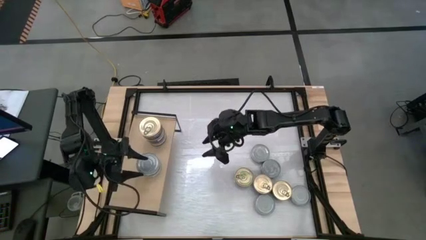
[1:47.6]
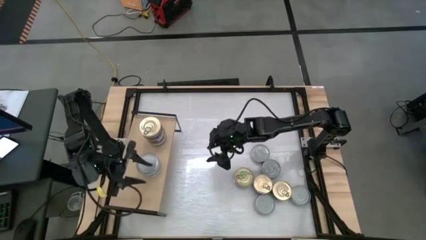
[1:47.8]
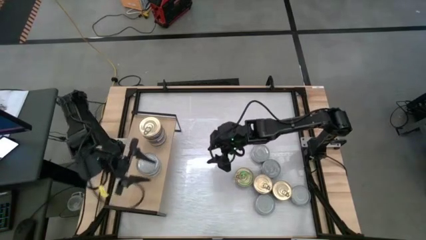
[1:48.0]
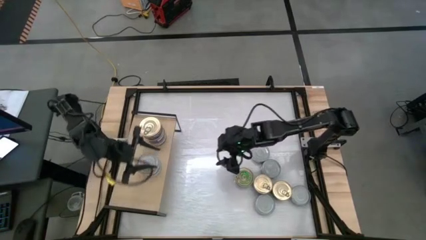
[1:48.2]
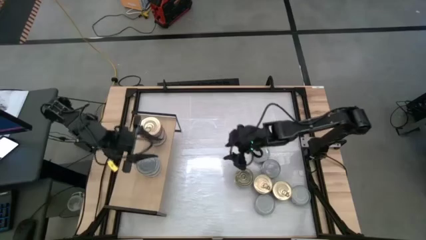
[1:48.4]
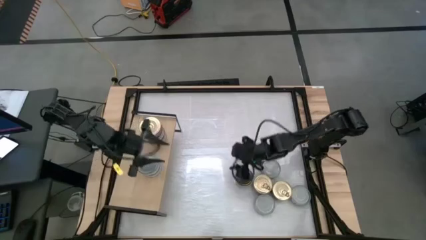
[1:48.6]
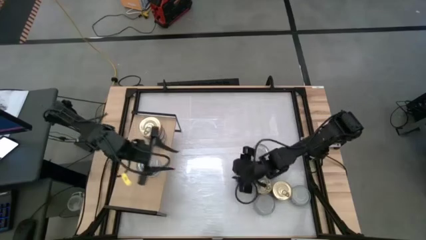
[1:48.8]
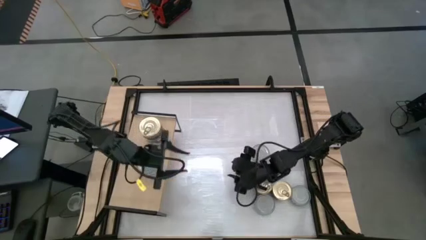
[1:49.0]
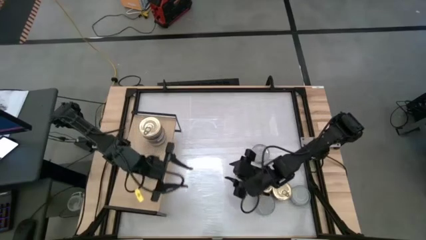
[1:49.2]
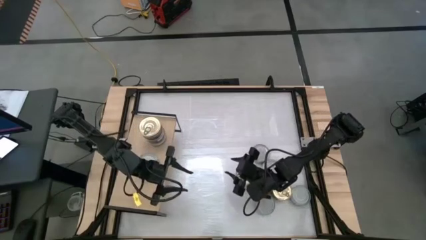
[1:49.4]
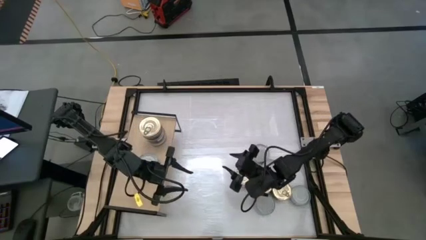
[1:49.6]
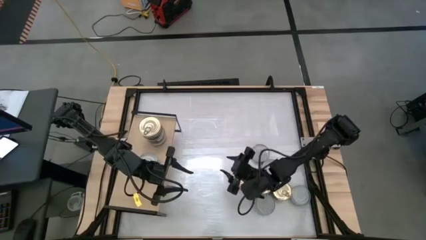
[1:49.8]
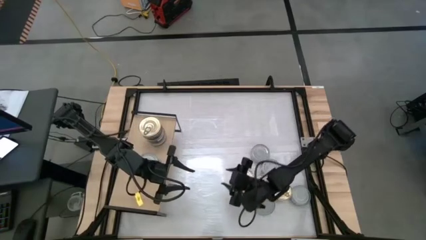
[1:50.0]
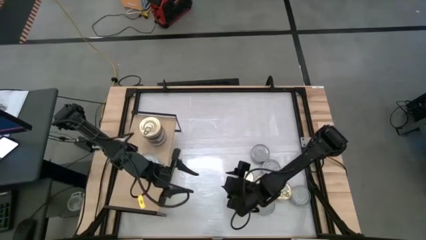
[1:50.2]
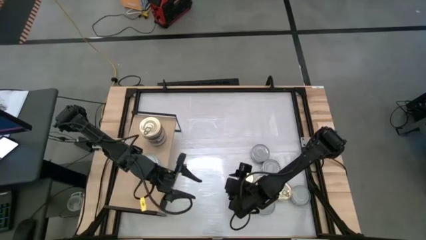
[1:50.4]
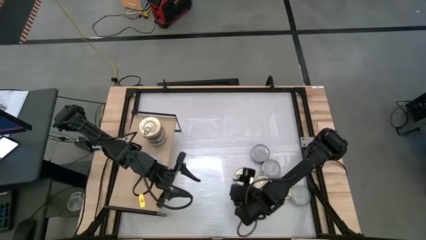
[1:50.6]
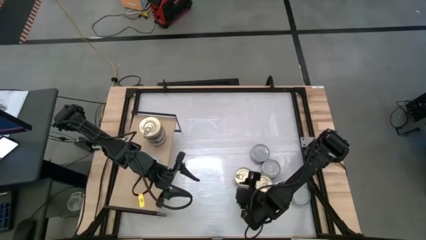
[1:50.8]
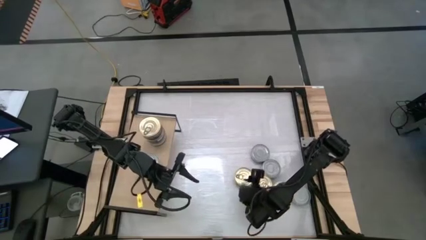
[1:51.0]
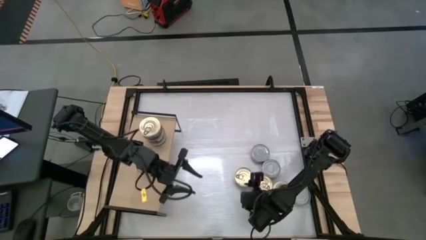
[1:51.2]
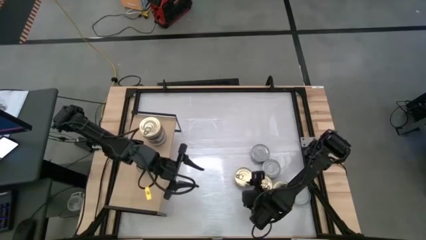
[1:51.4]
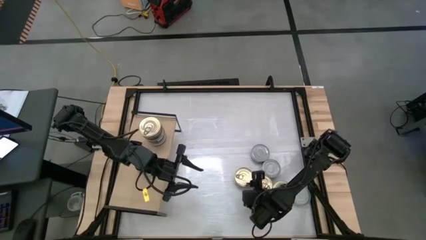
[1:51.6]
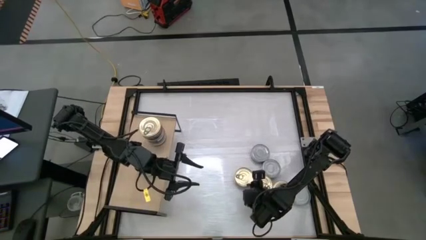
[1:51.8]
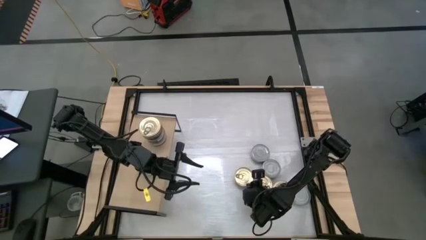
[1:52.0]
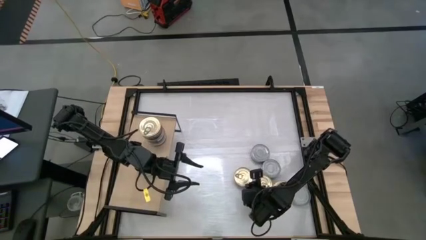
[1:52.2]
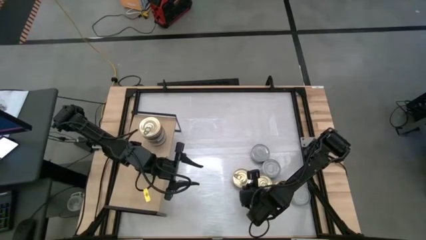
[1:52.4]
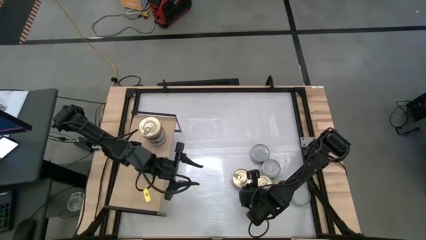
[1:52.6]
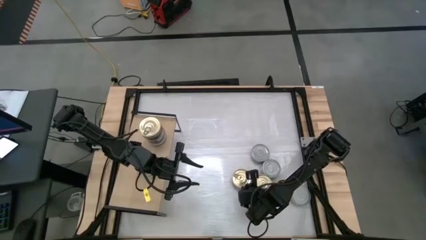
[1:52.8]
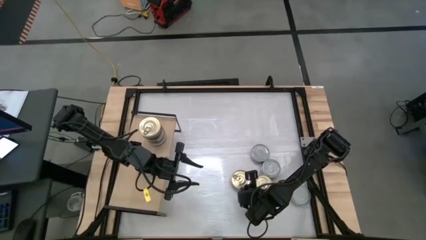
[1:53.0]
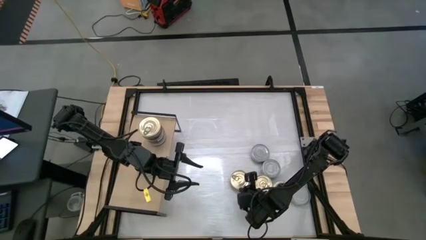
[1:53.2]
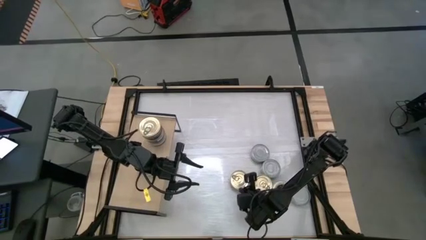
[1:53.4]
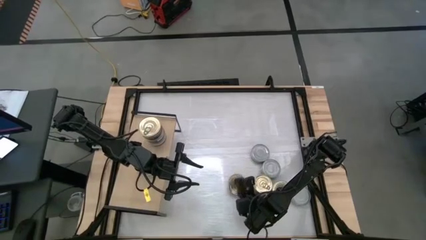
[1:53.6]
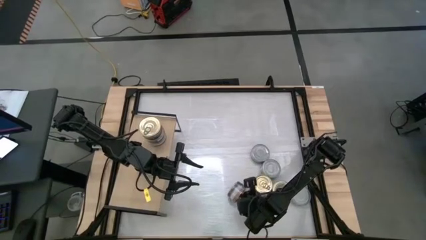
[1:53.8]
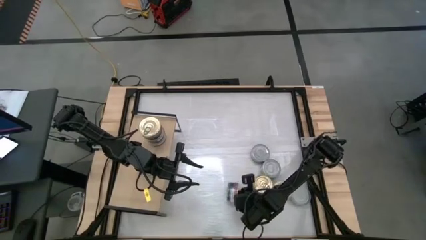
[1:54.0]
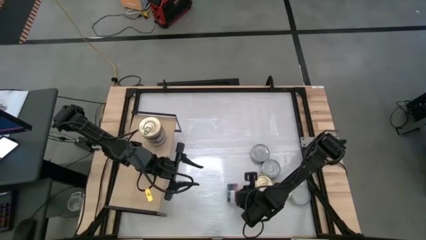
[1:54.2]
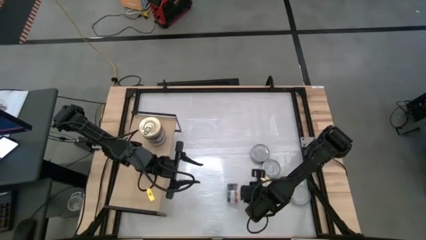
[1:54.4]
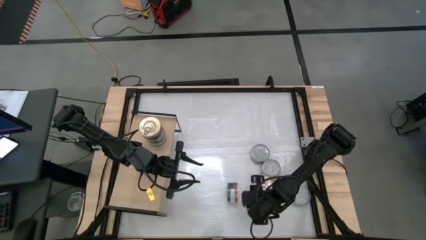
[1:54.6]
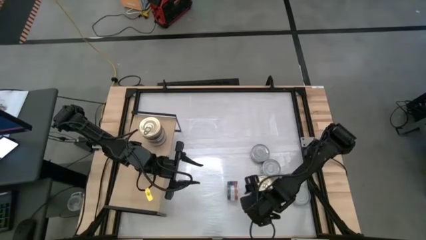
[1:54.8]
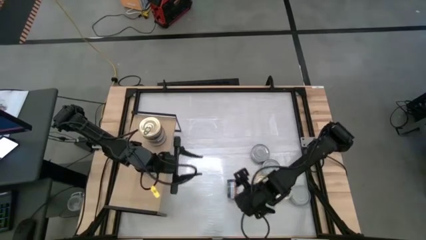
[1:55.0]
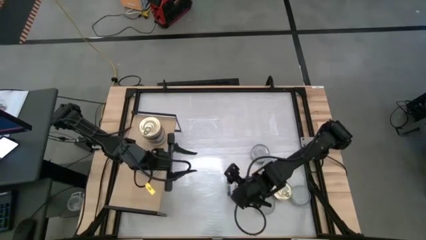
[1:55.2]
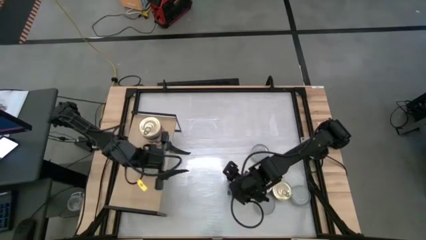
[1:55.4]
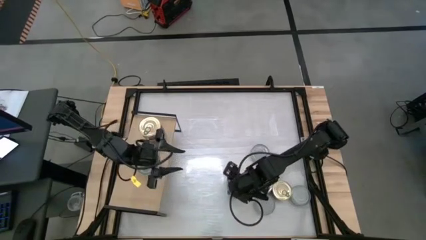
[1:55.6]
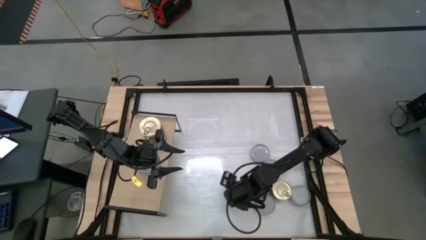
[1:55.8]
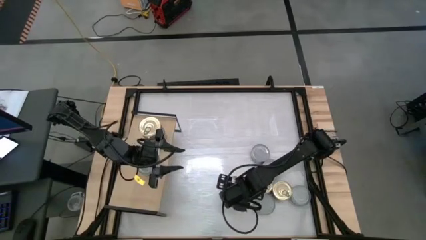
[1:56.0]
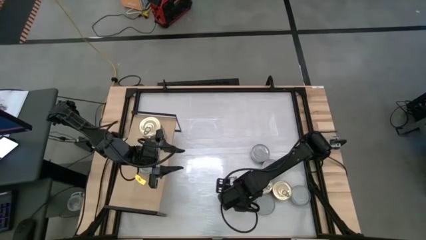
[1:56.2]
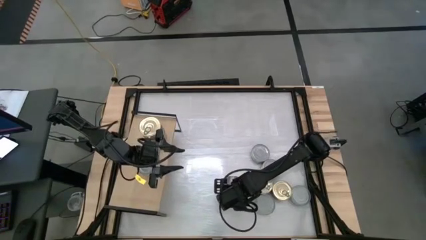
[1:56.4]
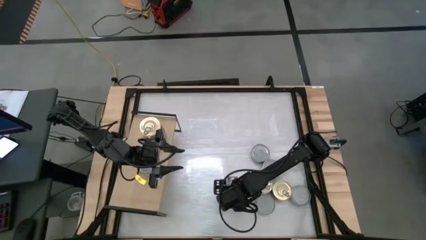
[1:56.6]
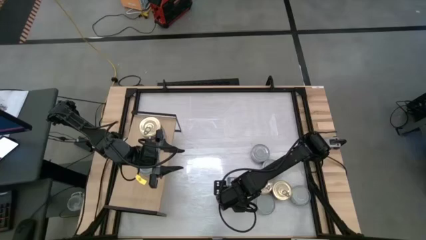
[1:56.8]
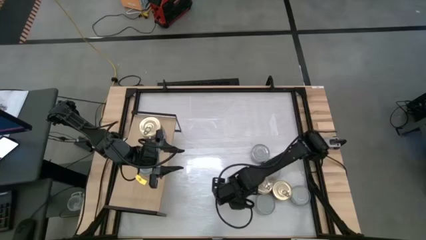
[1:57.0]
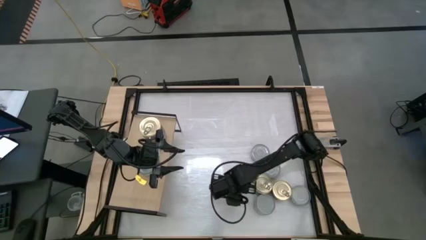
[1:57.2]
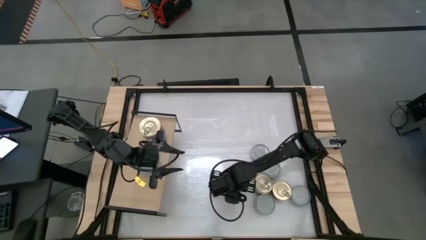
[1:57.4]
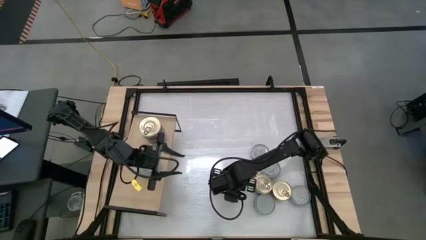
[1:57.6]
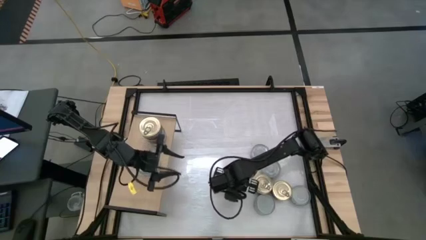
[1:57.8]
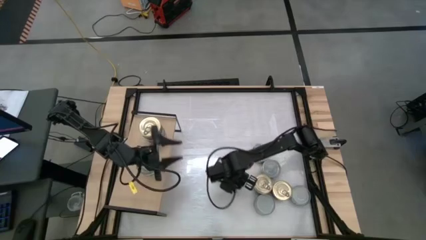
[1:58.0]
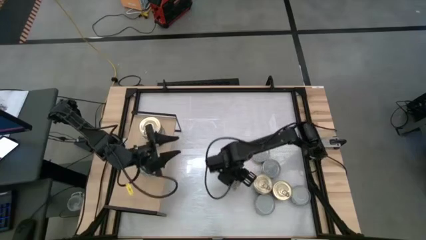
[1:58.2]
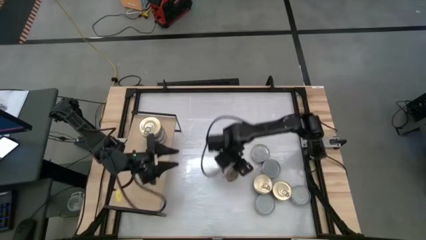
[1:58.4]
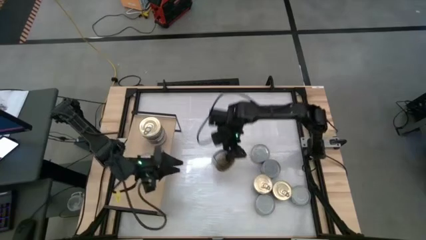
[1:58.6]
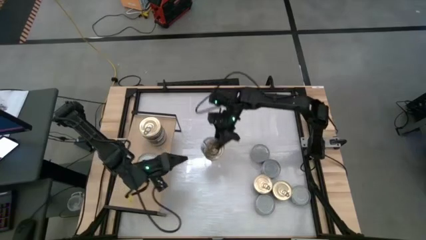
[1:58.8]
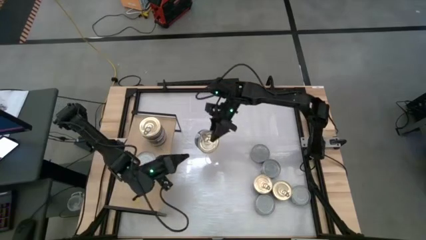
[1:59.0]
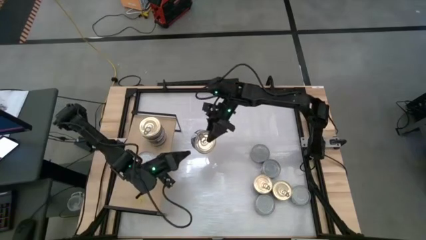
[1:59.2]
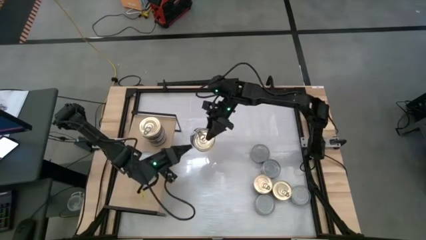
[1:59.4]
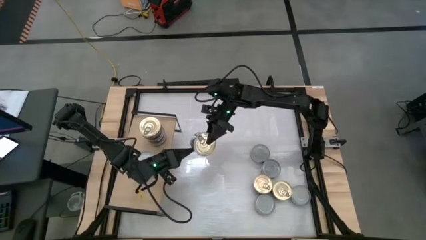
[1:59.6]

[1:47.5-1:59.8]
Task: Stack canned seafood by type on shelf
Stack the blue tuna can on top of the blue tuna can on the shelf

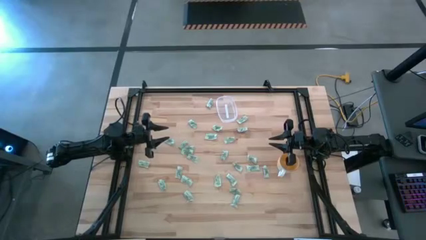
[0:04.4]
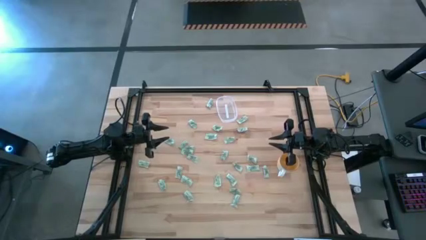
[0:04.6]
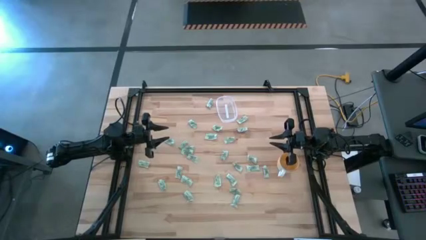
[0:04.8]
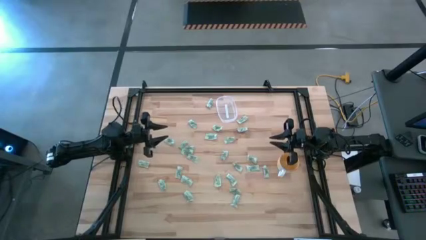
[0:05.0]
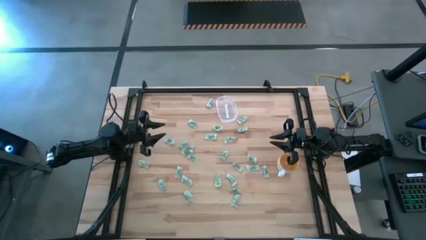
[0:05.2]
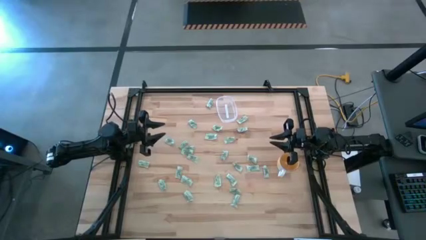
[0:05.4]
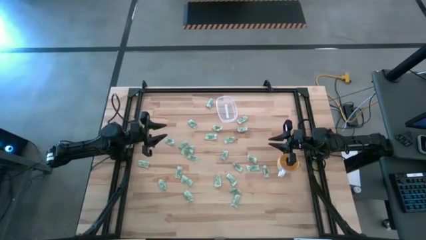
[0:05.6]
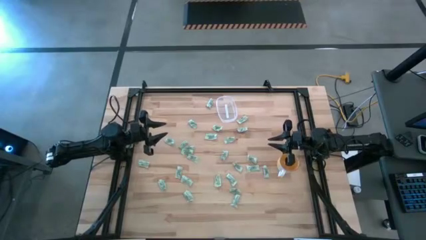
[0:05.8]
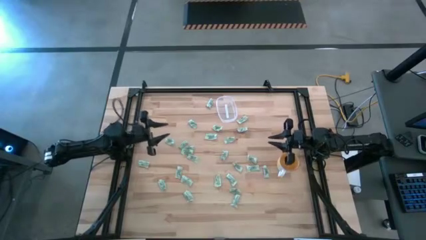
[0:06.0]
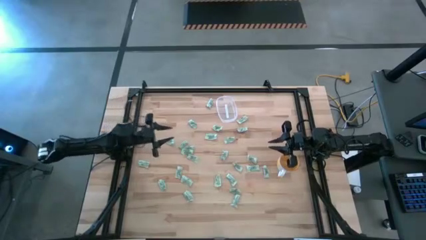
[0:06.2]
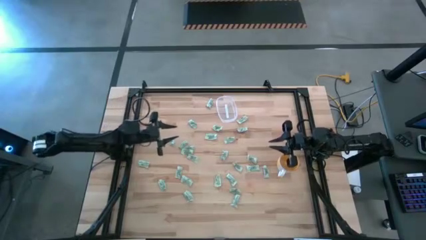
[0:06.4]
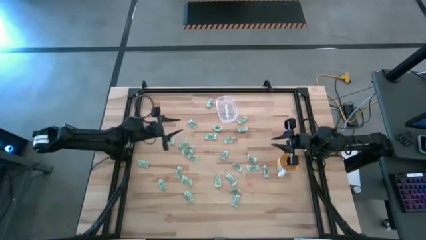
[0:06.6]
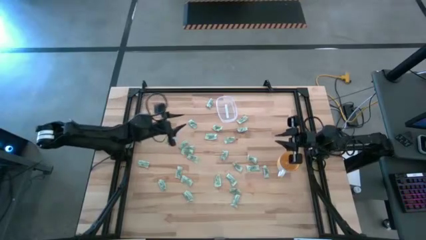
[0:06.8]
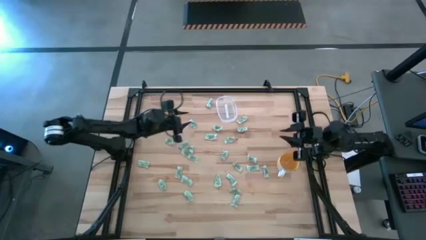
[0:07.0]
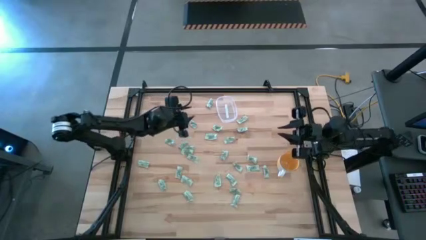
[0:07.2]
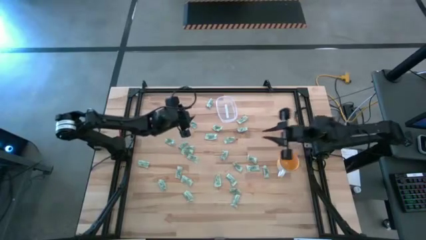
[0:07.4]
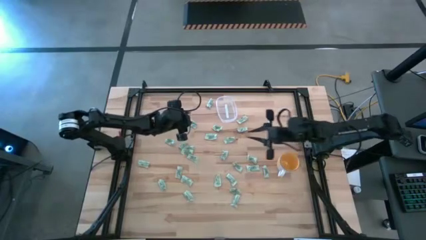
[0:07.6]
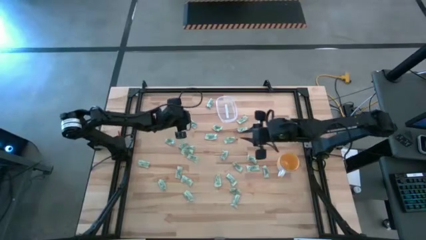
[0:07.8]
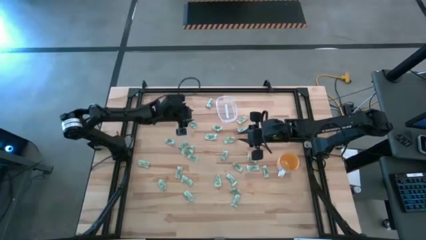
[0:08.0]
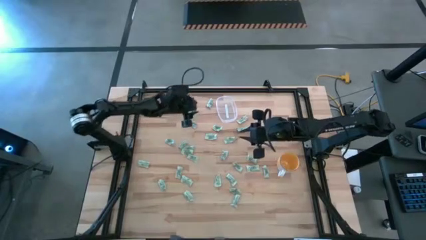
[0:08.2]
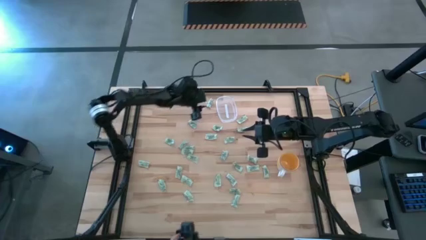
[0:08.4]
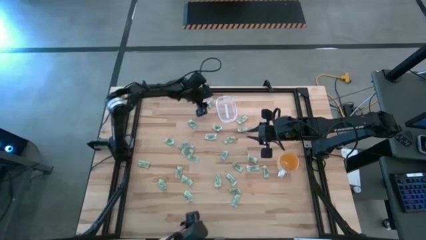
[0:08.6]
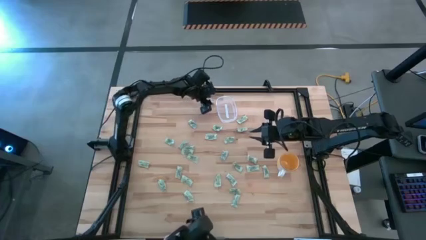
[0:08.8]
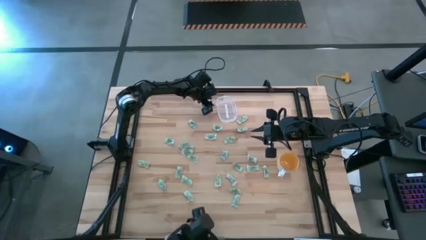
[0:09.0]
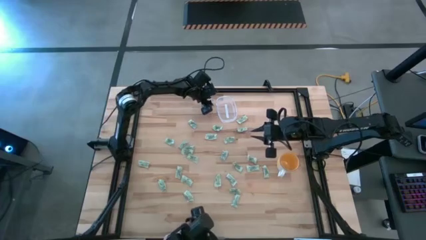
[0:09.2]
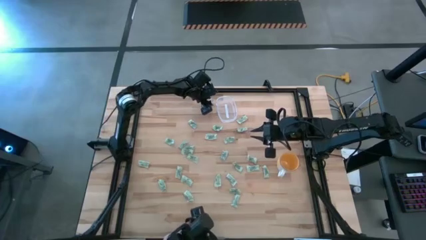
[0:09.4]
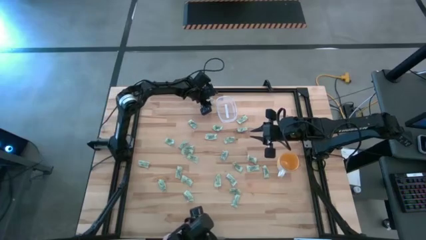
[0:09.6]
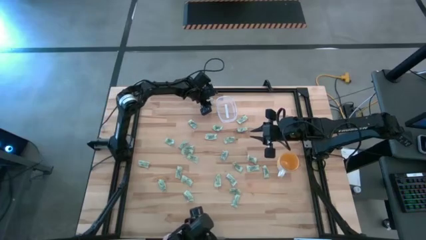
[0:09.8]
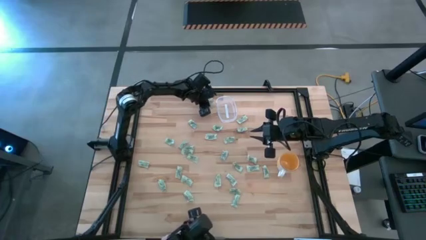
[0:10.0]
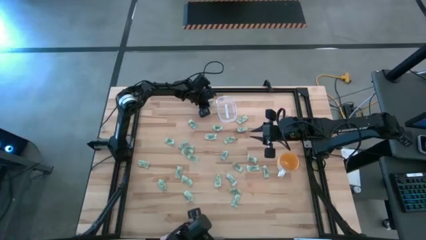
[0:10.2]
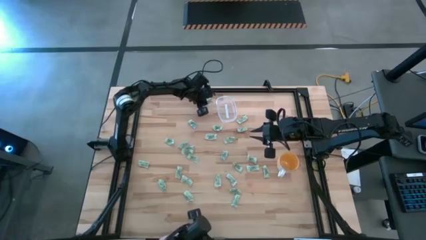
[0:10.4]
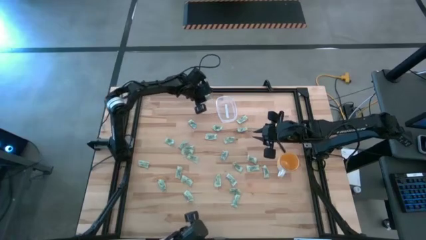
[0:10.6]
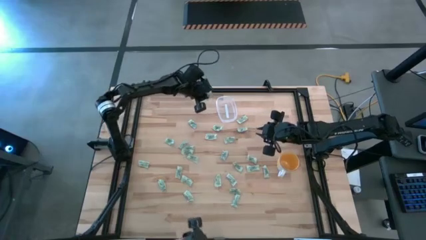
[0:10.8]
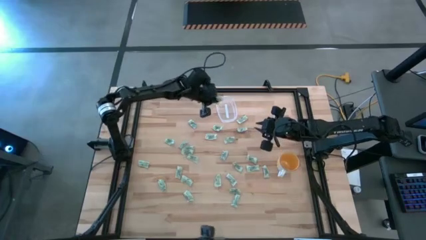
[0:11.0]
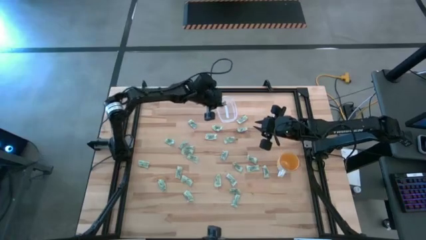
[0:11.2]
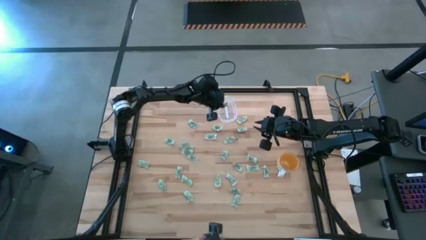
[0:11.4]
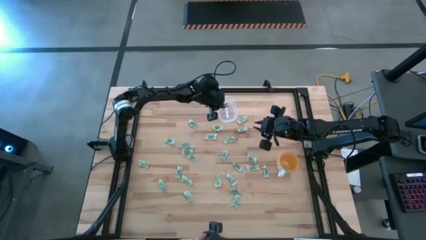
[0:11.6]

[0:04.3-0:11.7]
Task: Pick and place Stevia / Truvia into bins
Put the green stevia packet into the transparent bin
